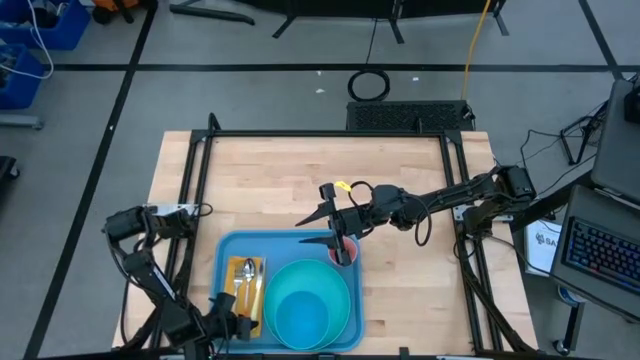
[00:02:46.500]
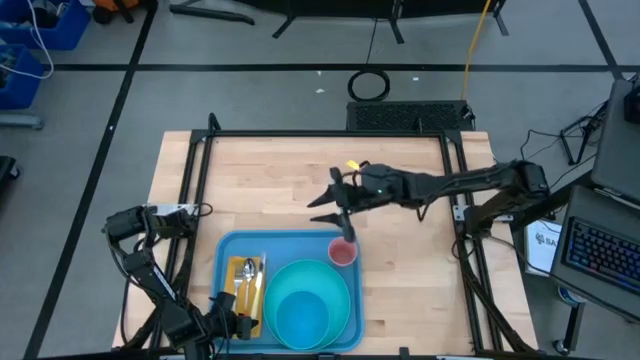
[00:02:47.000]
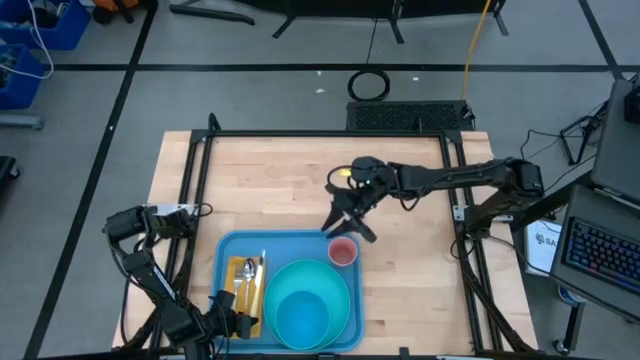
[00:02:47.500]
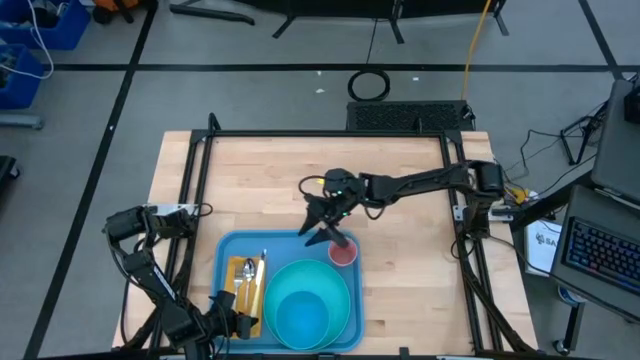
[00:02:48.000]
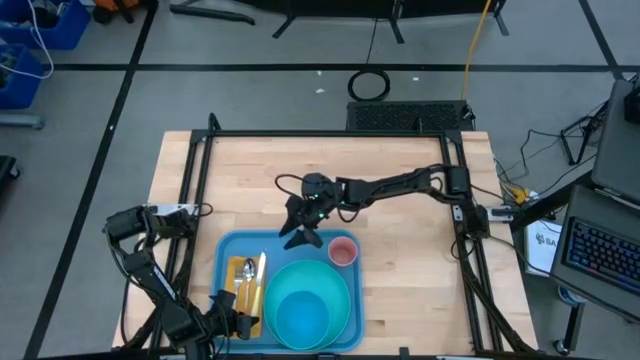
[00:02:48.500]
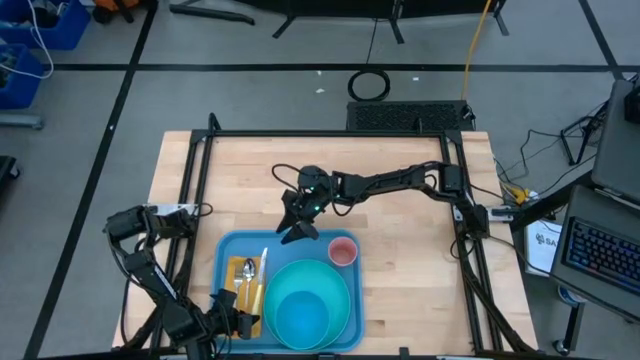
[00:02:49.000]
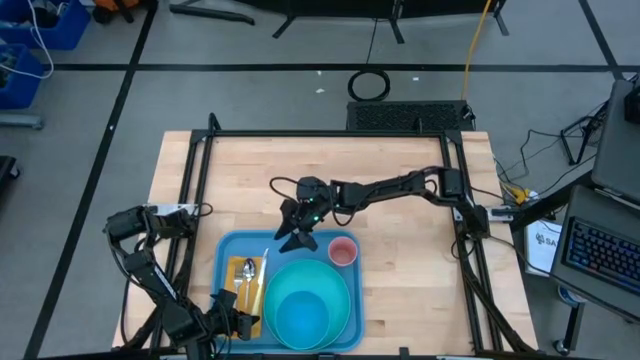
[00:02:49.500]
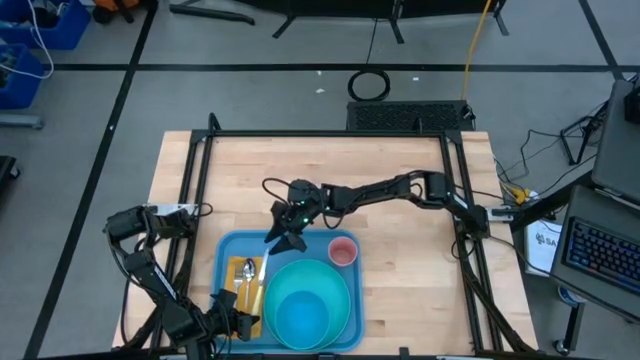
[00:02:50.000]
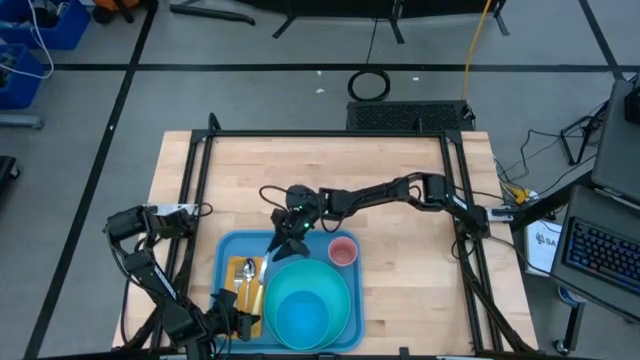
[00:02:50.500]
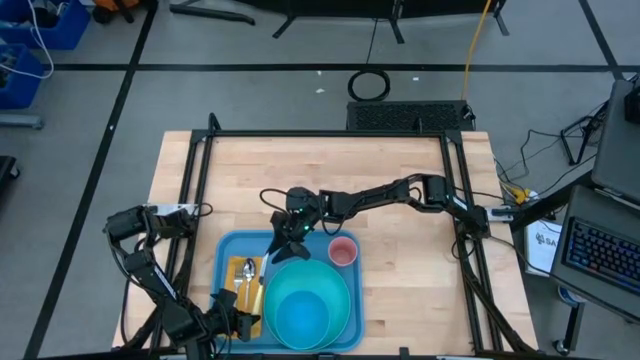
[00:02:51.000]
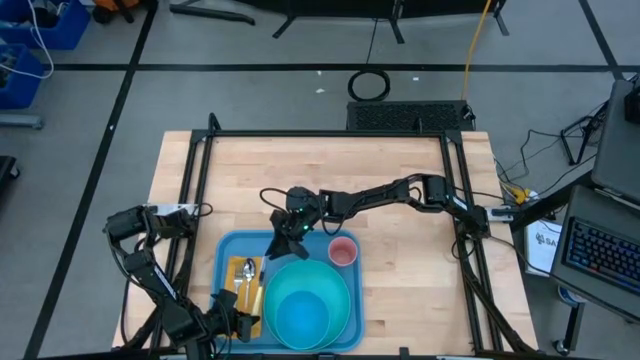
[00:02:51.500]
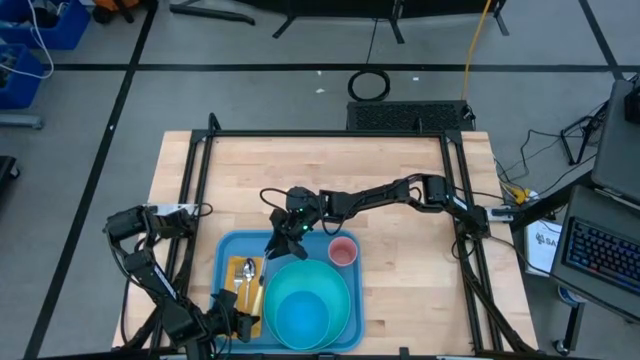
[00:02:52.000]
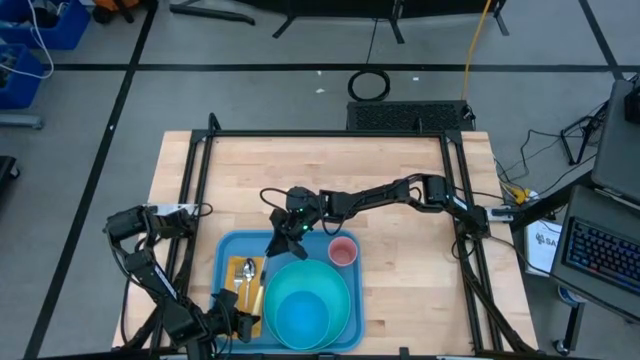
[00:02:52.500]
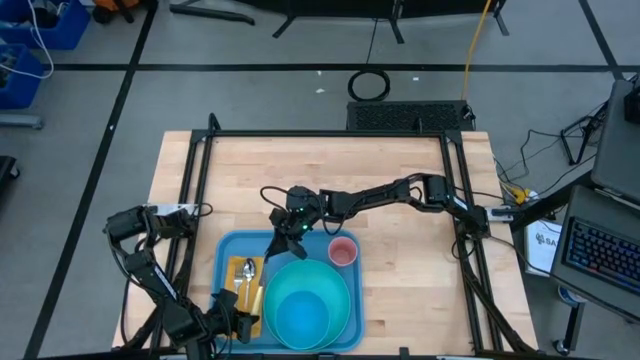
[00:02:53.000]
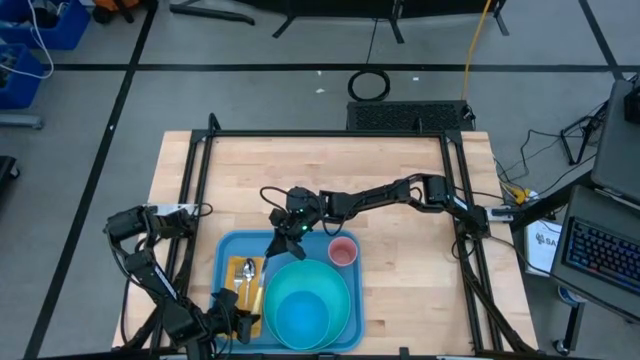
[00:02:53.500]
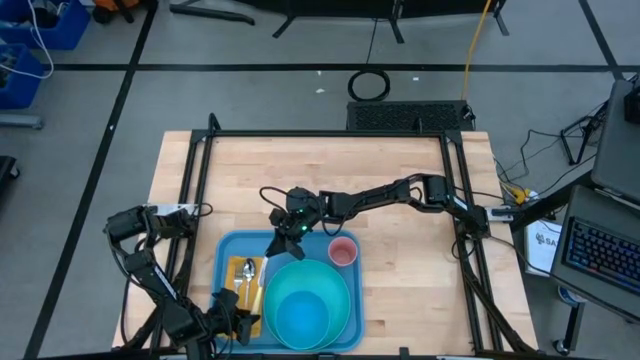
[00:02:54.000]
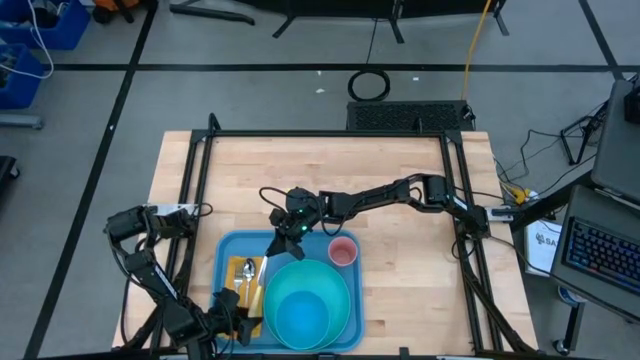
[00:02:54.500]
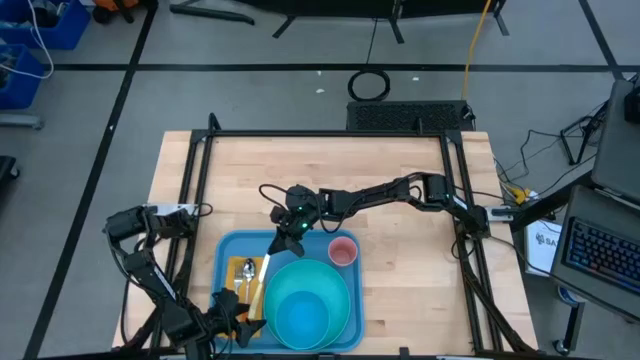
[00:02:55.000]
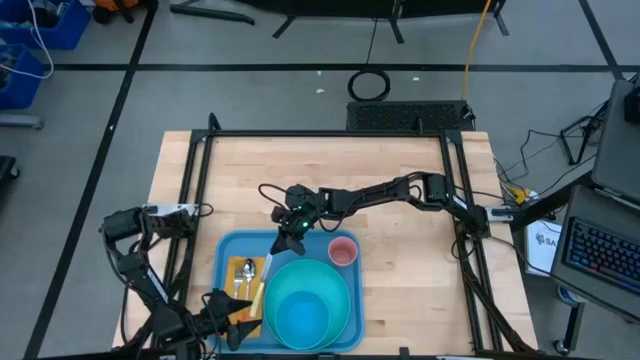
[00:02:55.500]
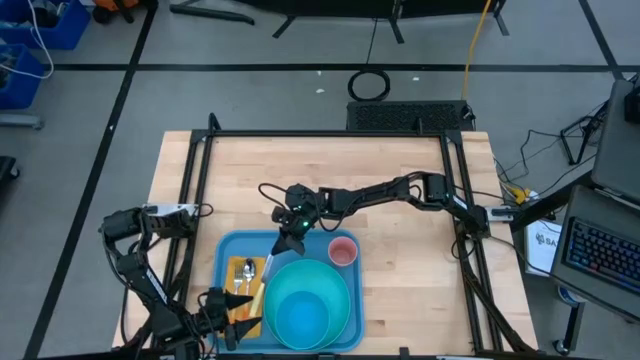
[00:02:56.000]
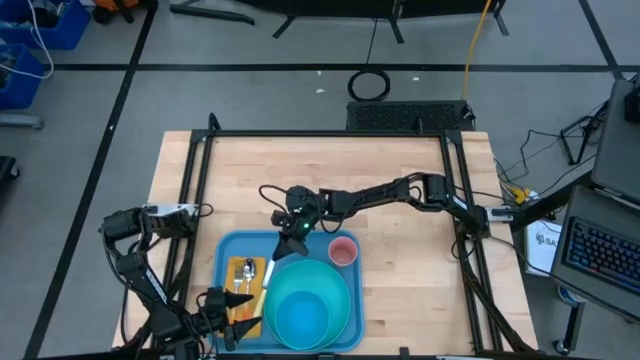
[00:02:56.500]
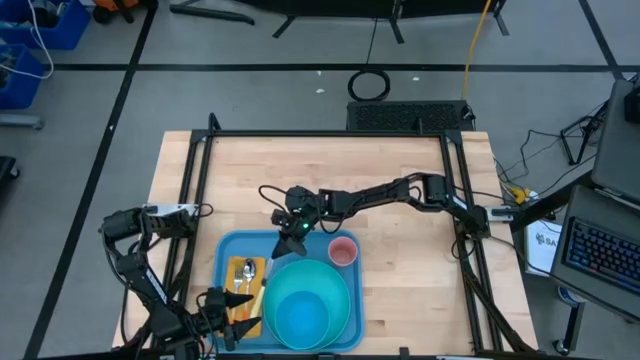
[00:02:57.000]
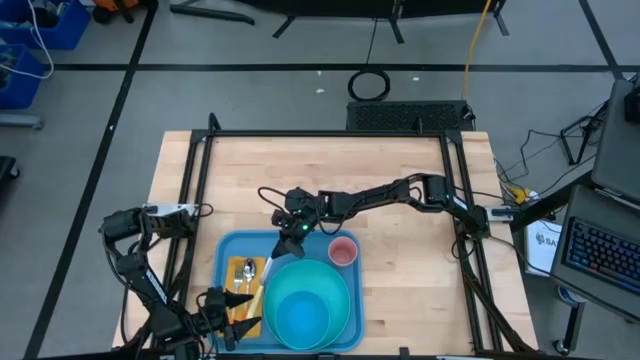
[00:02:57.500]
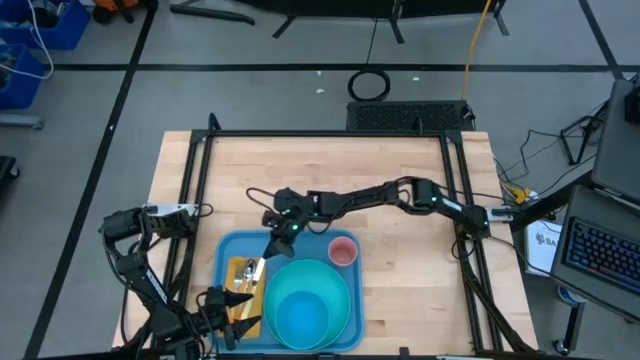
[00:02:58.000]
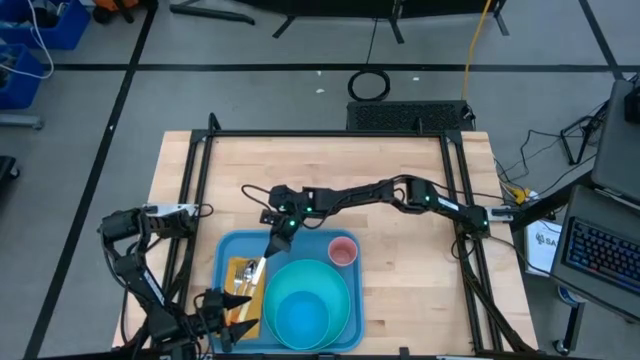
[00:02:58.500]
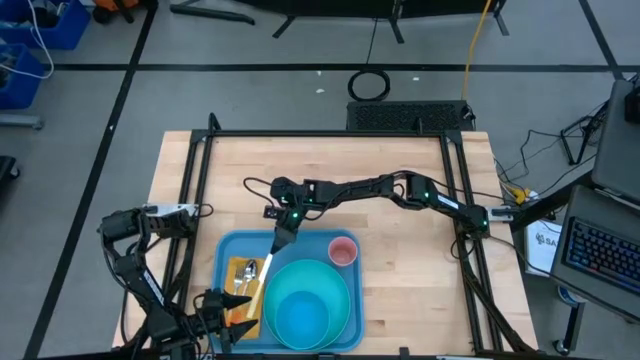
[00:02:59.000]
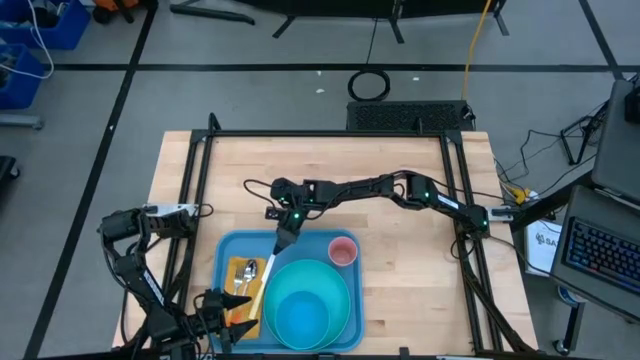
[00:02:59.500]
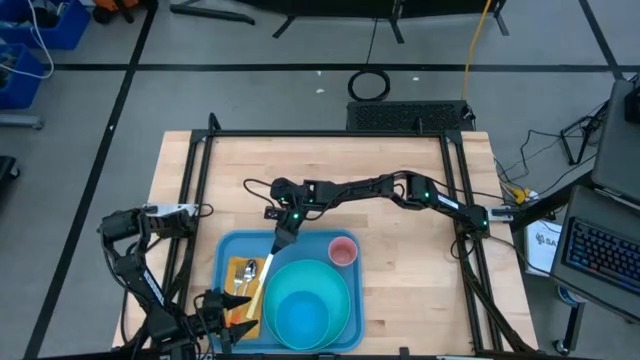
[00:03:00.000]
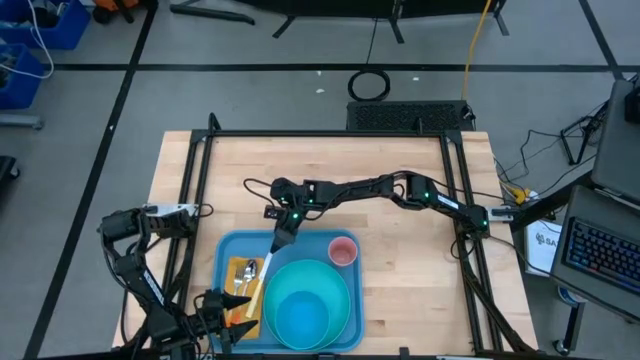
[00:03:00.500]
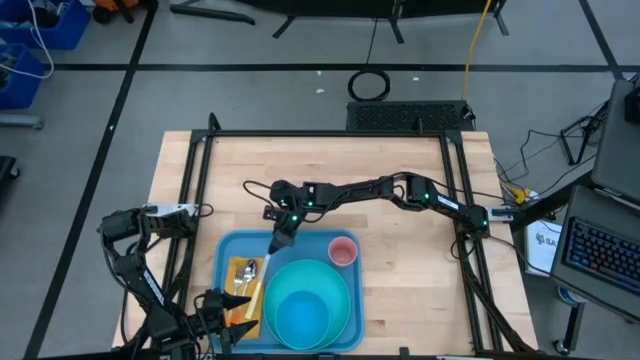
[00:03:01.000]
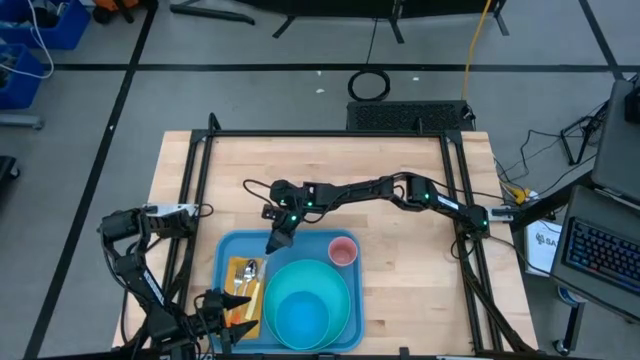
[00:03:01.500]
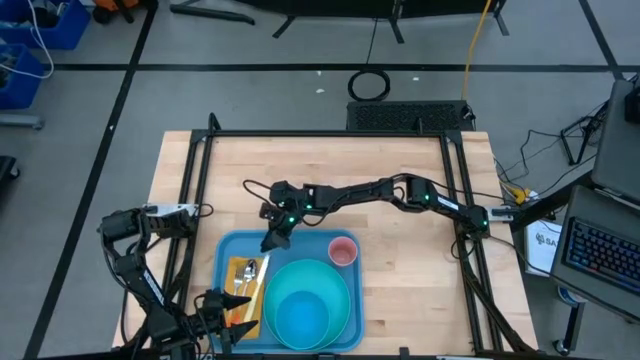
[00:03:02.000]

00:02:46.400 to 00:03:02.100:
Task: Set up tray
Put the light yellow table knife to the right of the orange spoon on the yellow table napkin
